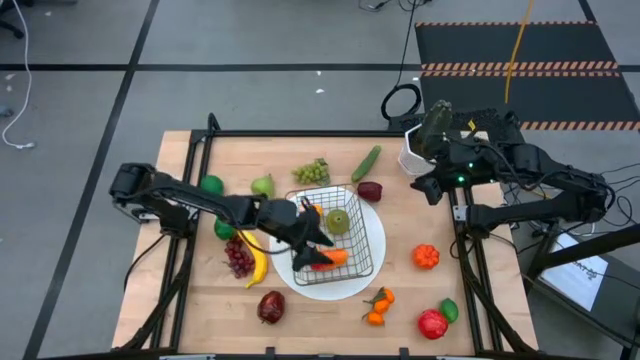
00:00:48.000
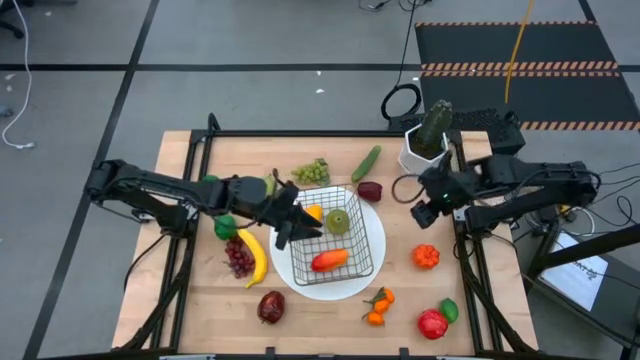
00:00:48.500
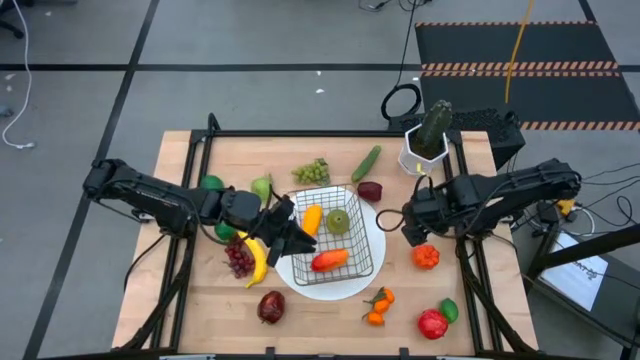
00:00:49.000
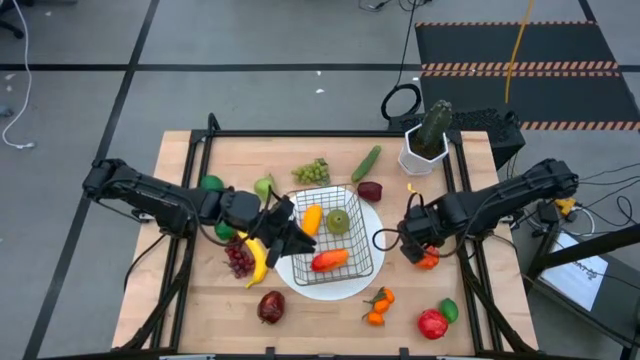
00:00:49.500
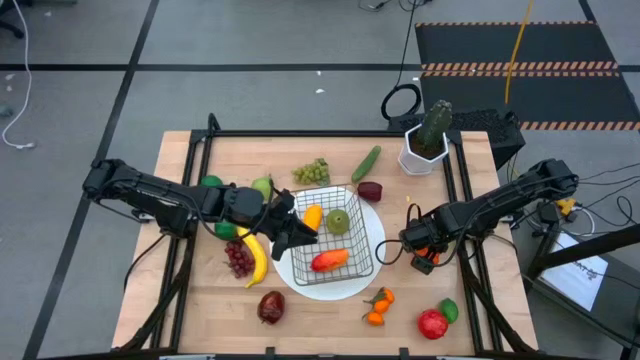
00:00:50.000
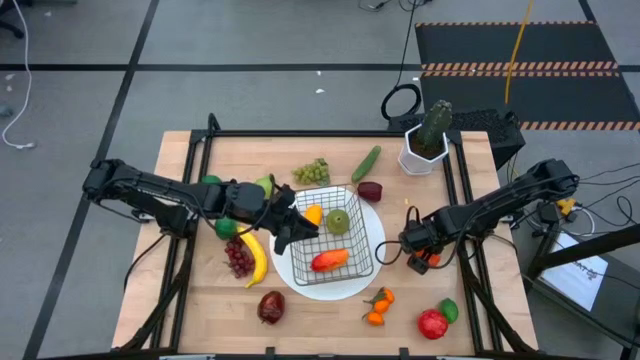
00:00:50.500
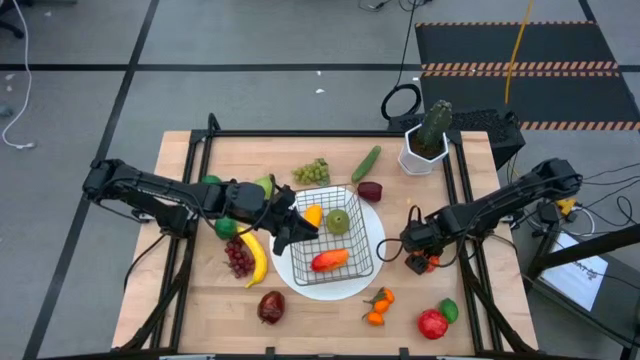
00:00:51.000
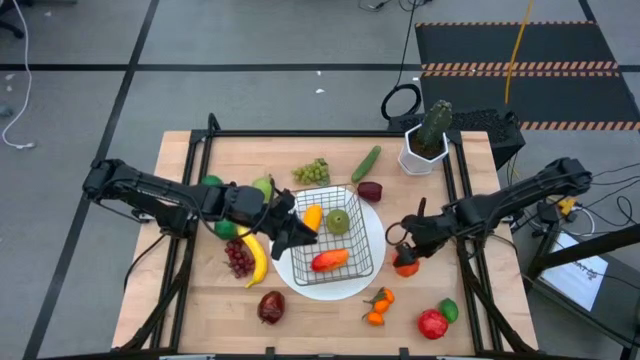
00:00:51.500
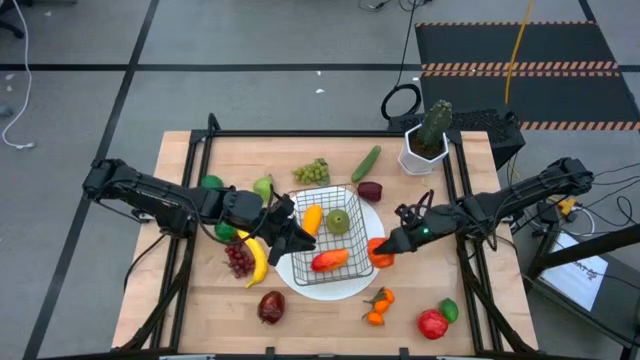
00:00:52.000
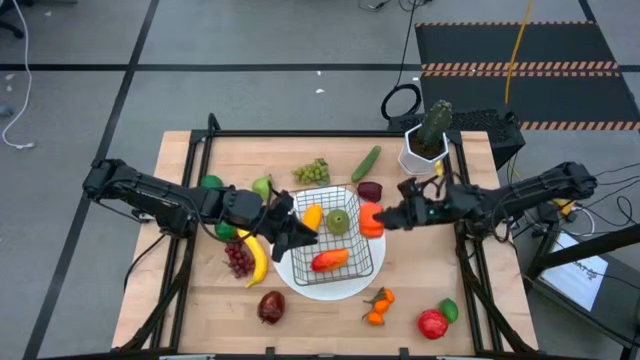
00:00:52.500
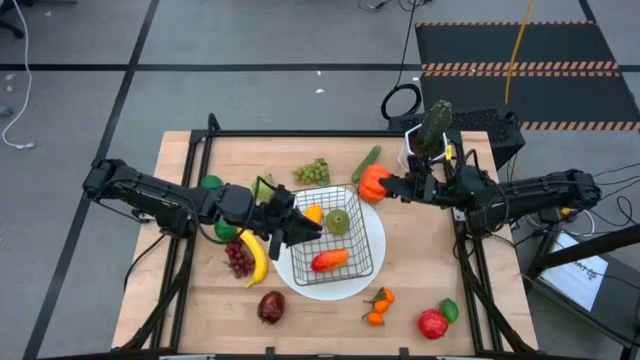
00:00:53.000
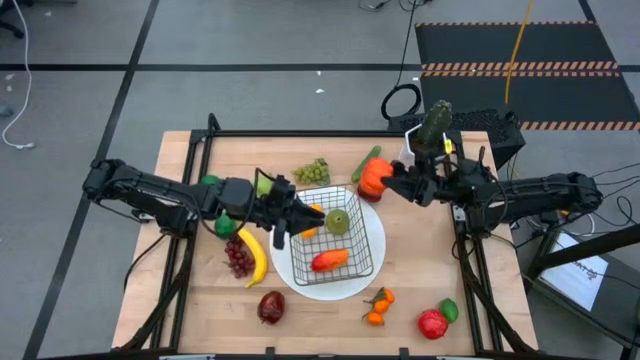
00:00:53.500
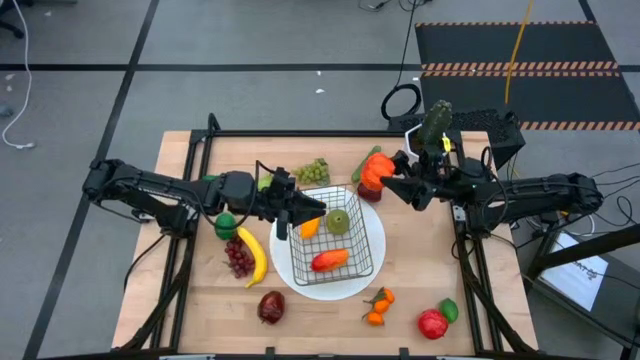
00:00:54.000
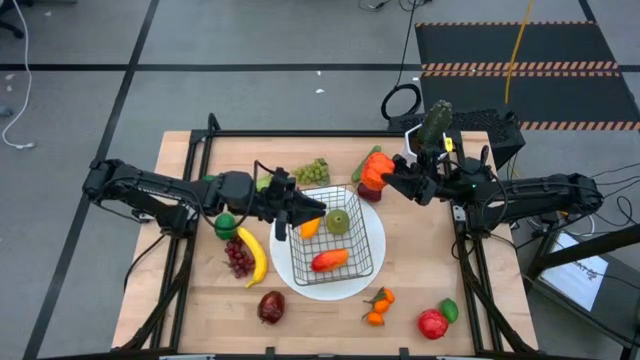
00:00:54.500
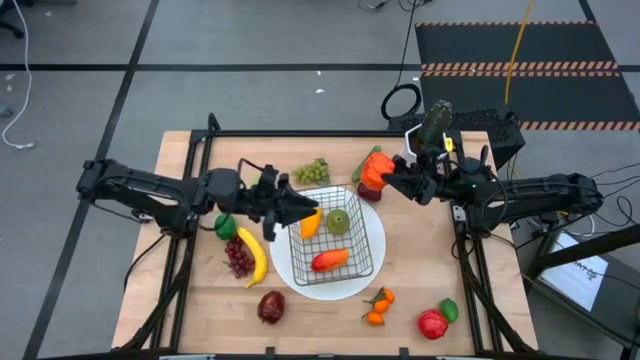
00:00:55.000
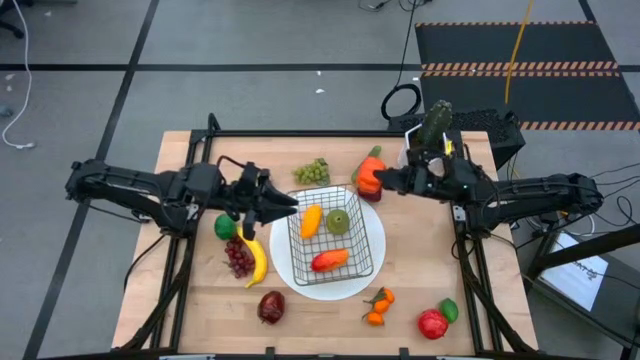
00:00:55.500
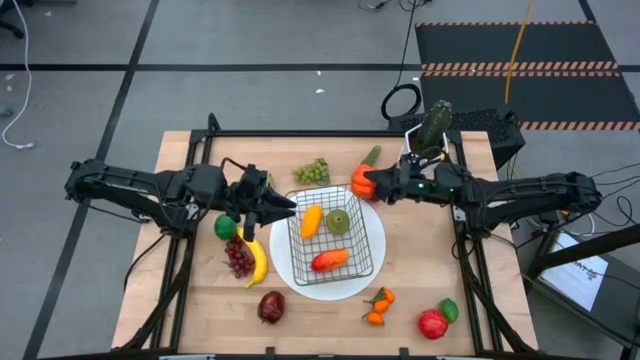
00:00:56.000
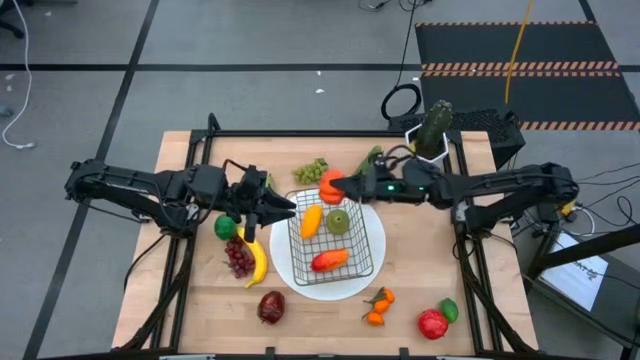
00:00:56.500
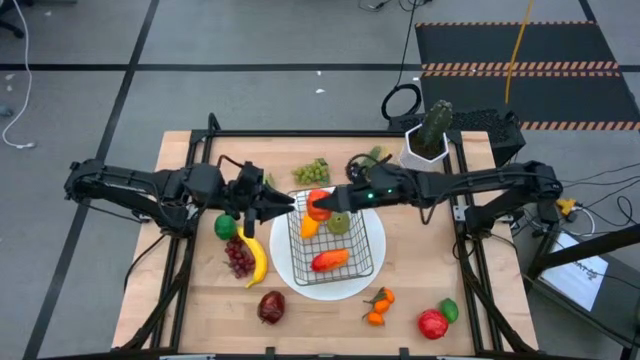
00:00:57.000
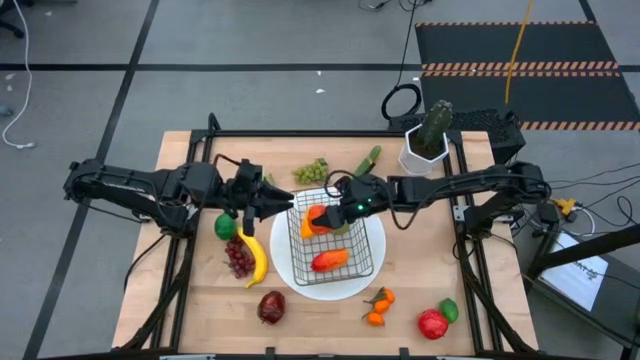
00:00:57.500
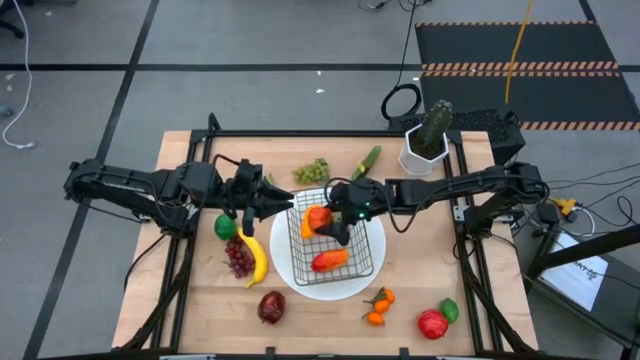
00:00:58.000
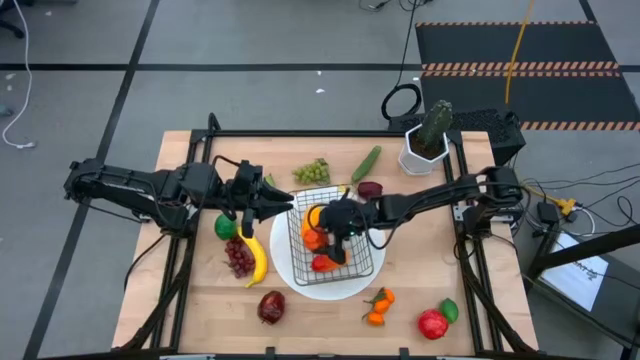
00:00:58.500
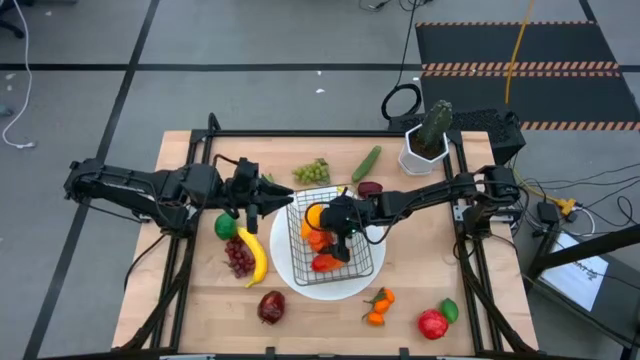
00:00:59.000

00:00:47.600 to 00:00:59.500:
Task: Build produce basket
Put the orange pumpkin into the black wire basket

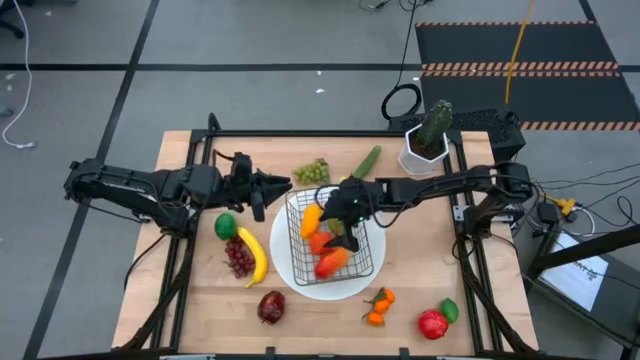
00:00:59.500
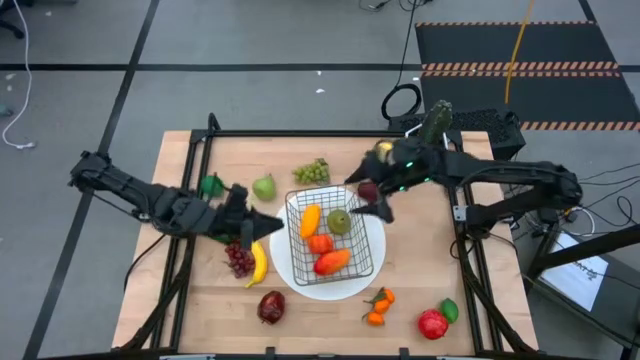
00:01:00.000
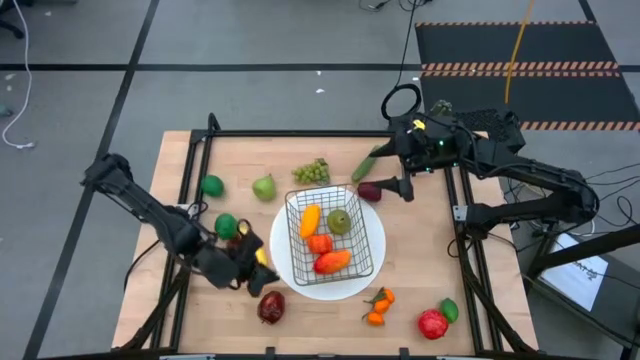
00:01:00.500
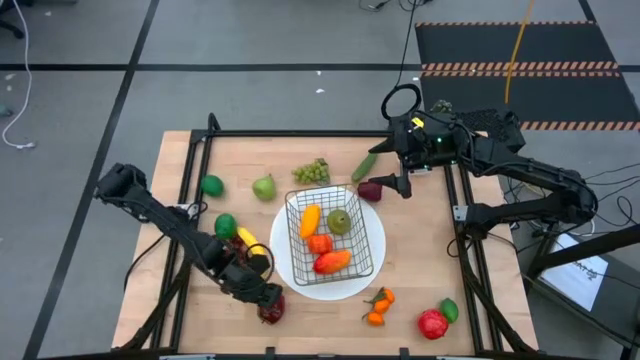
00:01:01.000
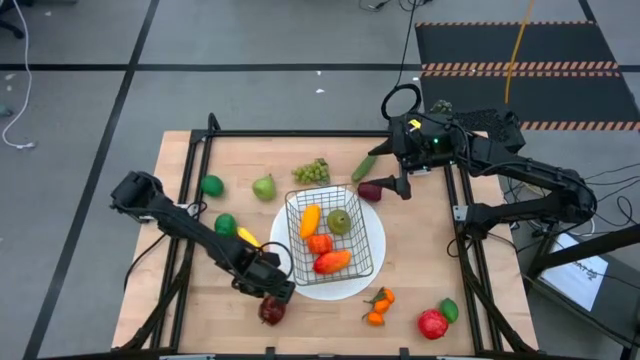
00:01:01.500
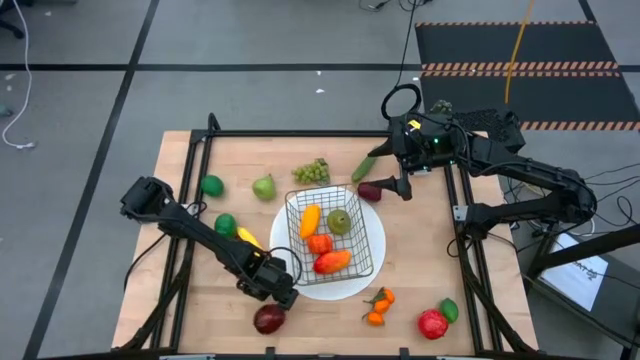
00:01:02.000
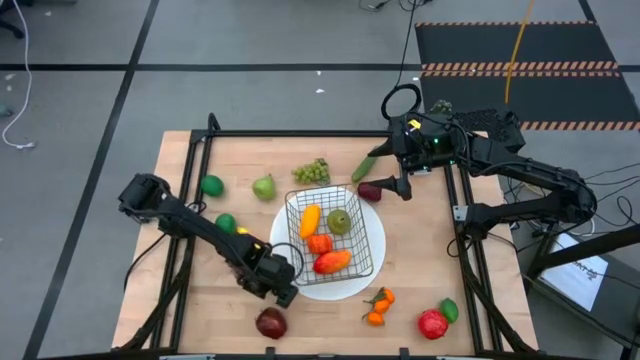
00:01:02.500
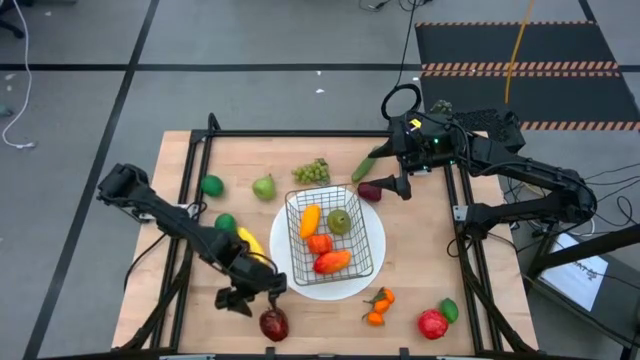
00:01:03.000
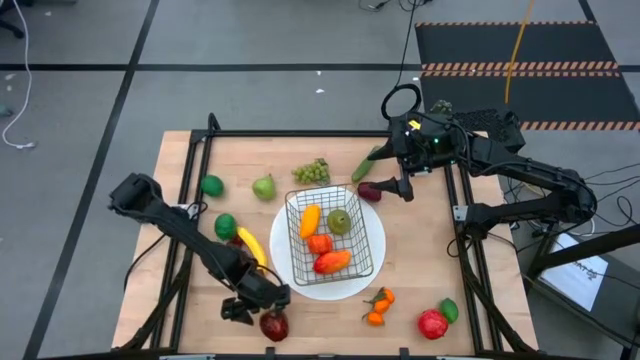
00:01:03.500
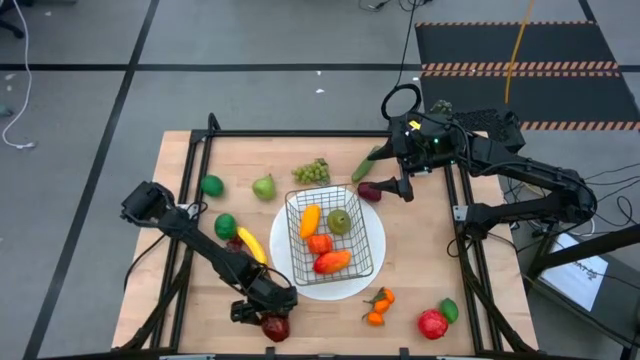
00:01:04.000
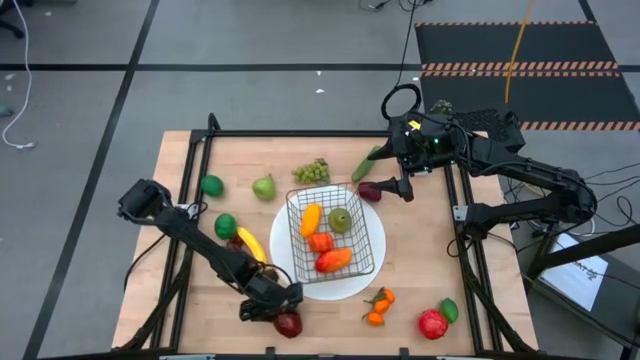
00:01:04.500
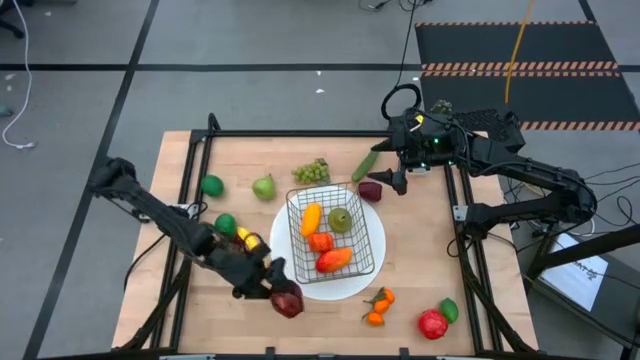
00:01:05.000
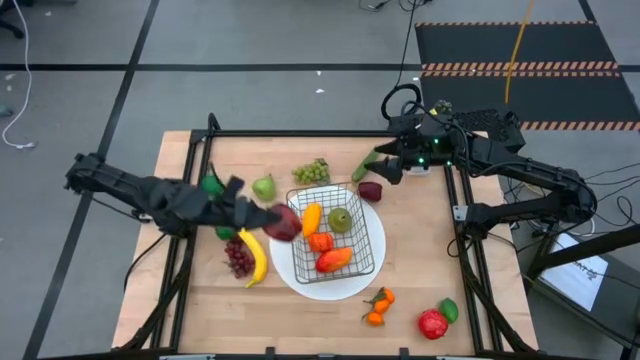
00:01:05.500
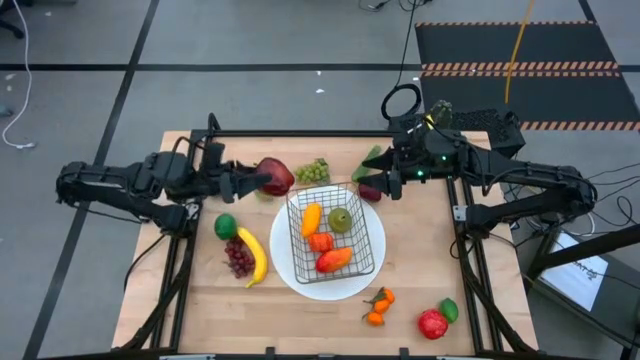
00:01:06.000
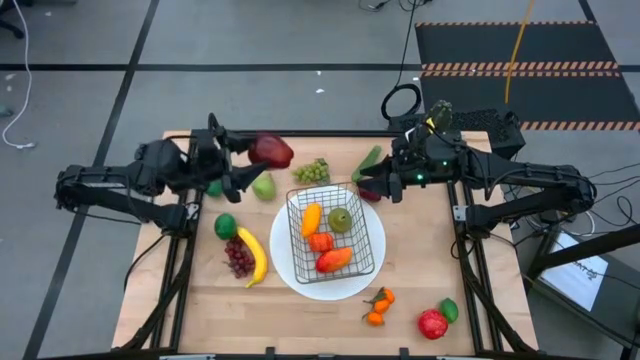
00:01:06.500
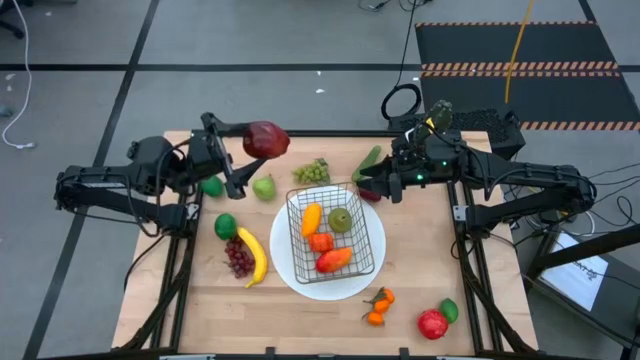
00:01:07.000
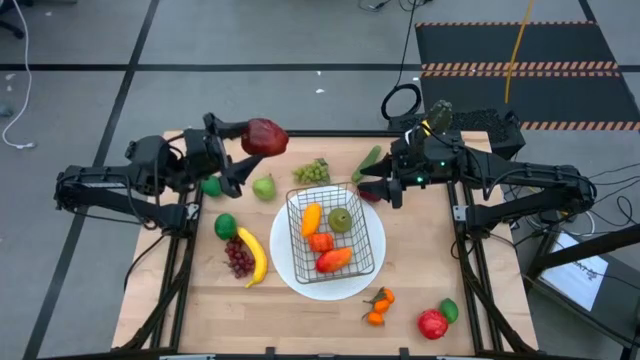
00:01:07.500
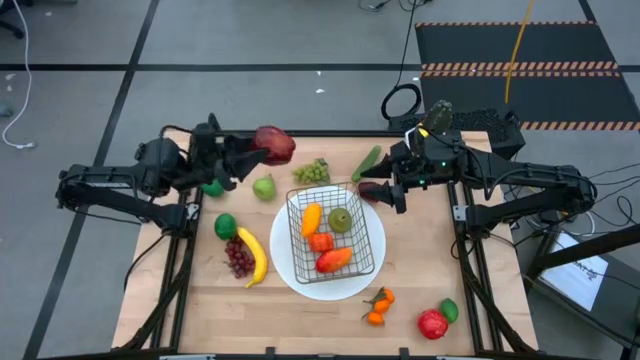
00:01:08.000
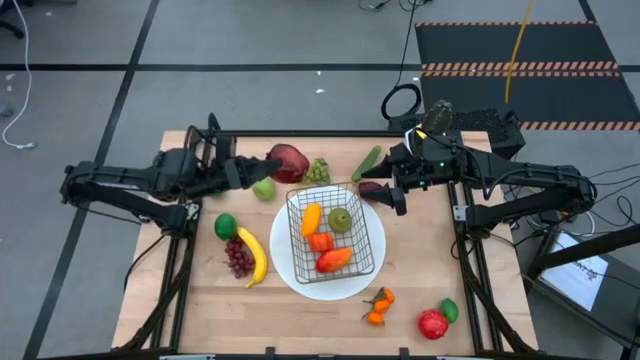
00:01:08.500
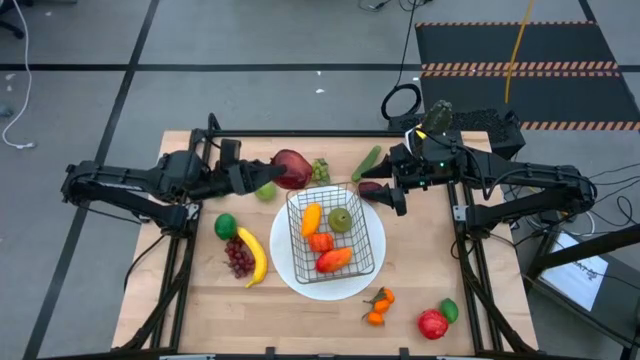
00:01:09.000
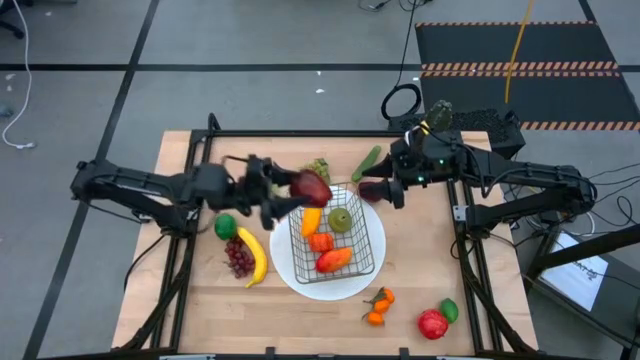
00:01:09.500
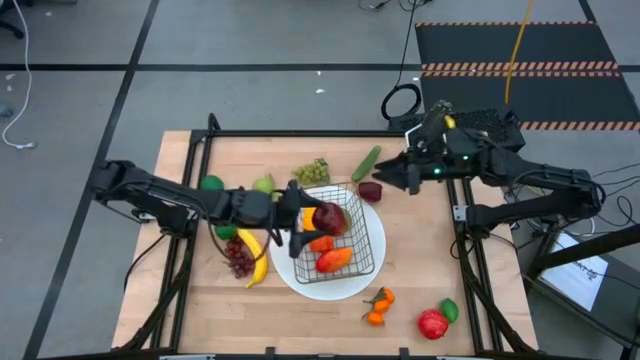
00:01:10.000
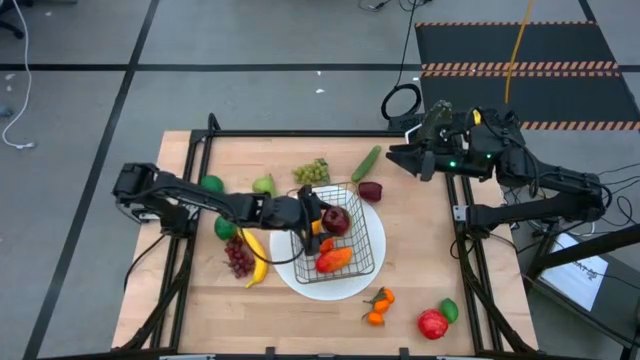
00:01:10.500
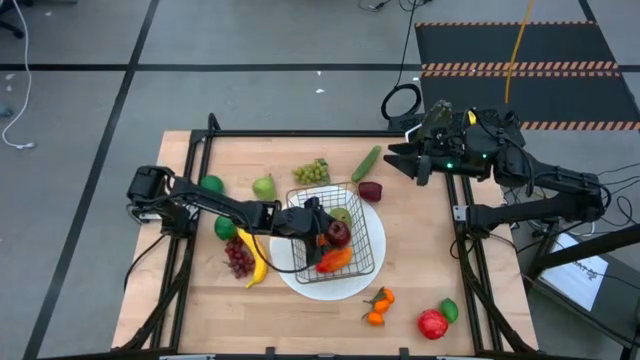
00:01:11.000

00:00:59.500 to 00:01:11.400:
Put the bottom dark red apple into the black wire basket
